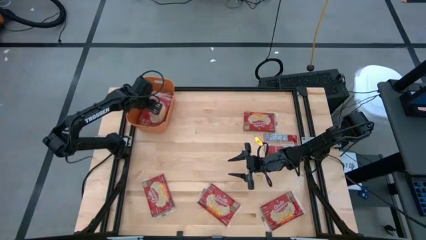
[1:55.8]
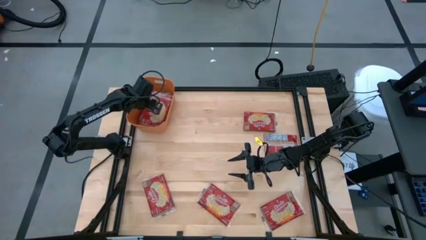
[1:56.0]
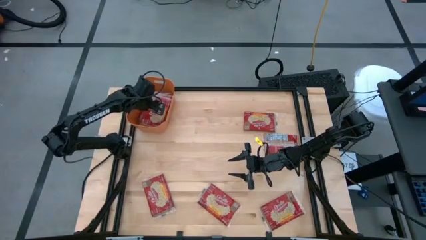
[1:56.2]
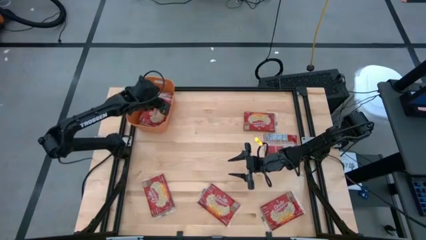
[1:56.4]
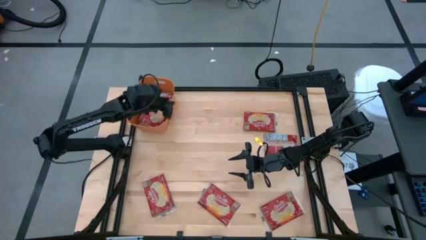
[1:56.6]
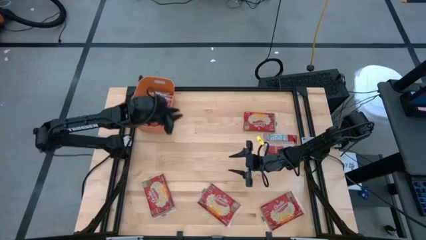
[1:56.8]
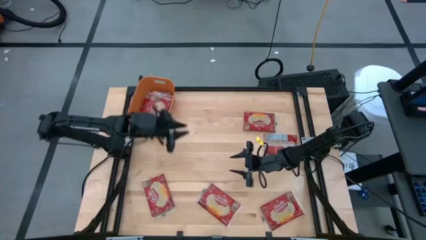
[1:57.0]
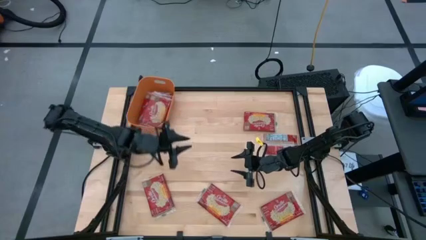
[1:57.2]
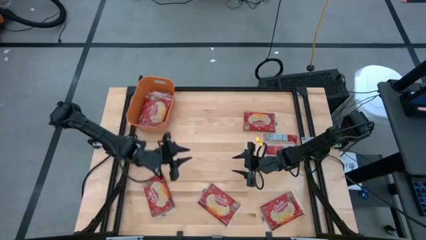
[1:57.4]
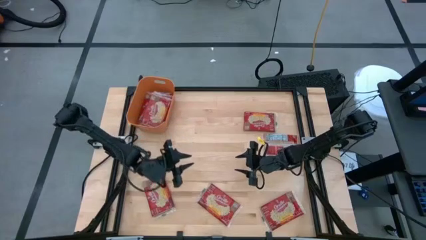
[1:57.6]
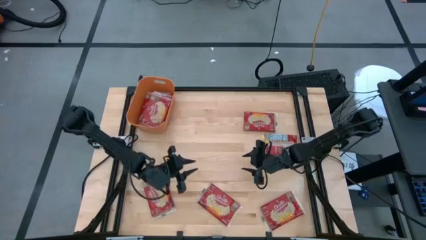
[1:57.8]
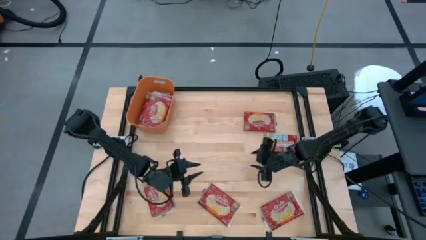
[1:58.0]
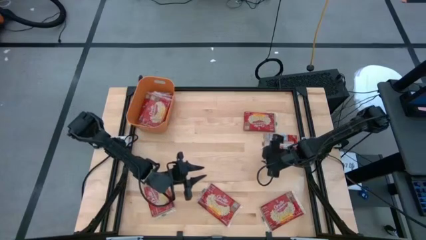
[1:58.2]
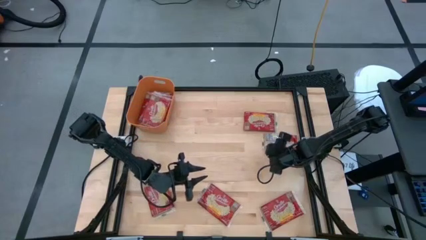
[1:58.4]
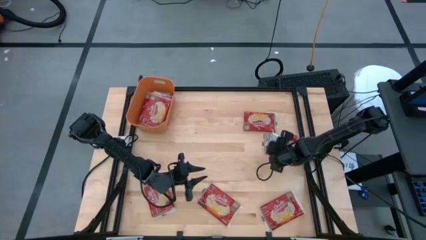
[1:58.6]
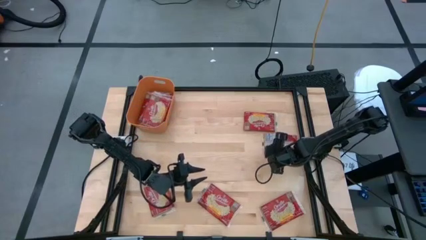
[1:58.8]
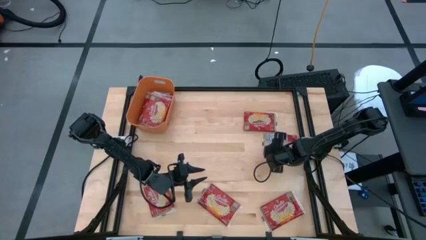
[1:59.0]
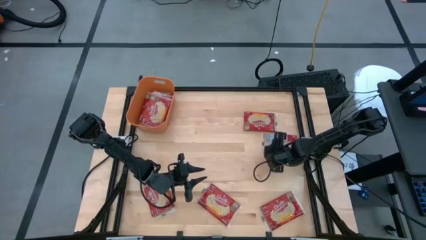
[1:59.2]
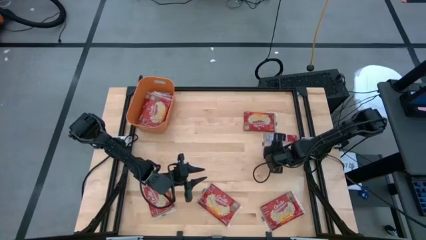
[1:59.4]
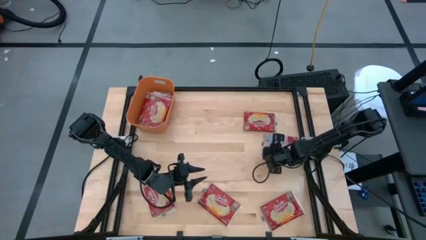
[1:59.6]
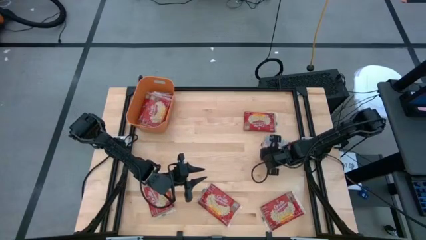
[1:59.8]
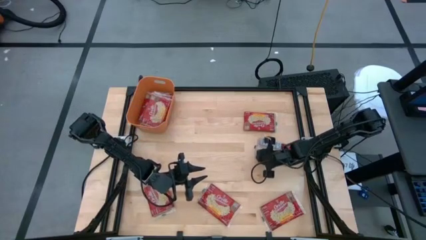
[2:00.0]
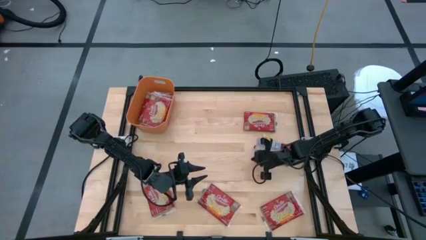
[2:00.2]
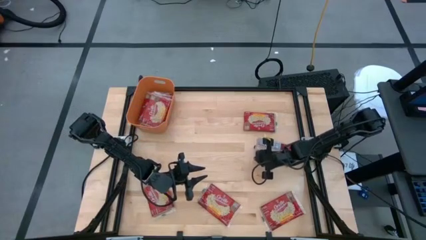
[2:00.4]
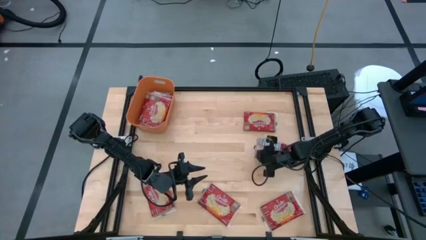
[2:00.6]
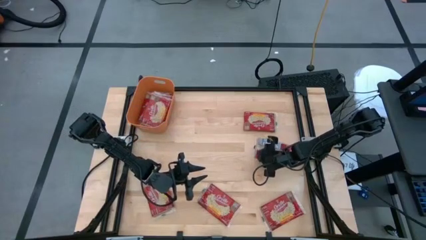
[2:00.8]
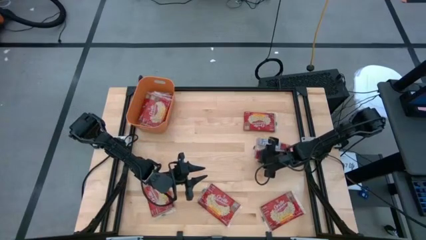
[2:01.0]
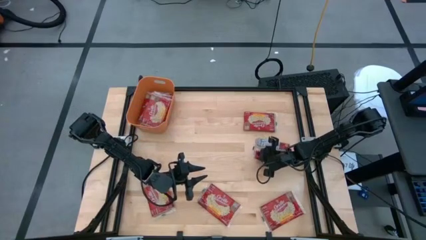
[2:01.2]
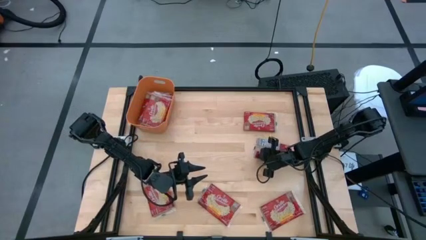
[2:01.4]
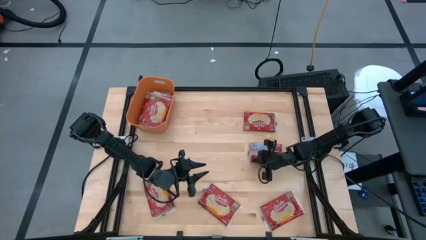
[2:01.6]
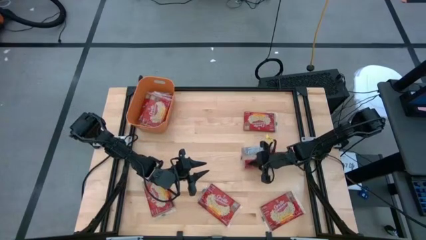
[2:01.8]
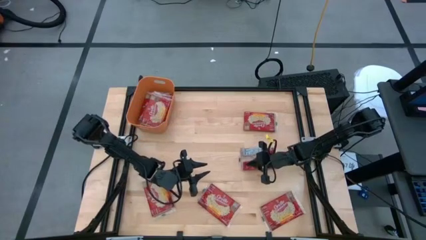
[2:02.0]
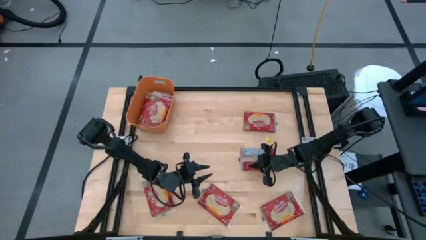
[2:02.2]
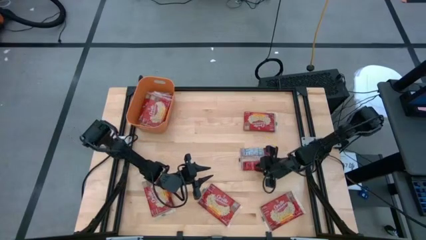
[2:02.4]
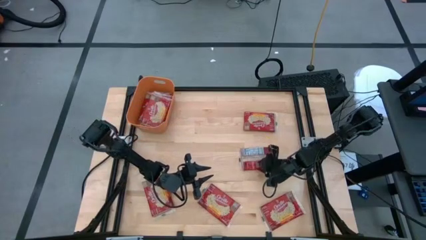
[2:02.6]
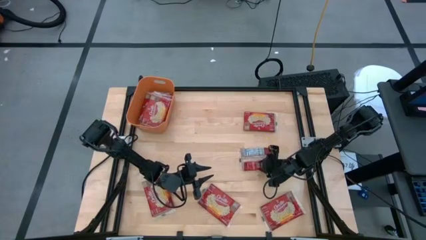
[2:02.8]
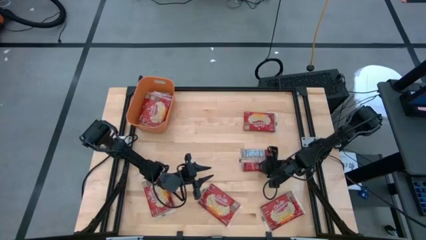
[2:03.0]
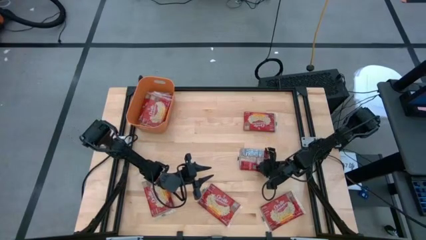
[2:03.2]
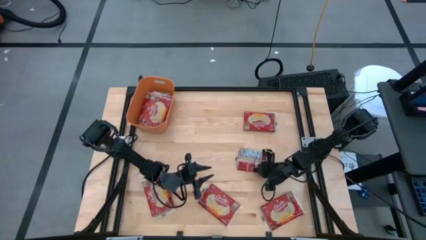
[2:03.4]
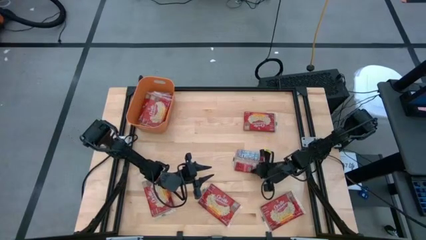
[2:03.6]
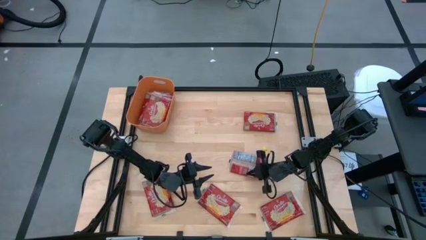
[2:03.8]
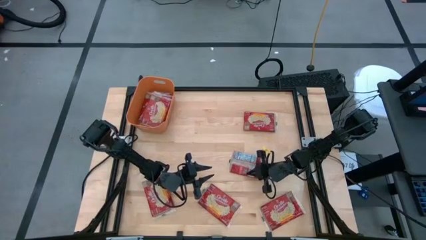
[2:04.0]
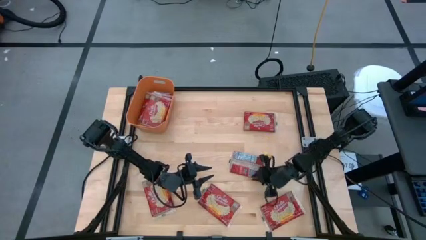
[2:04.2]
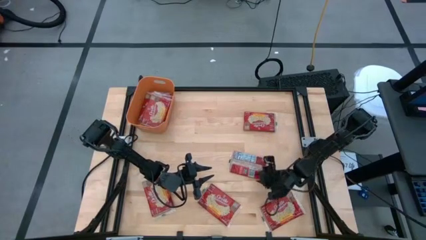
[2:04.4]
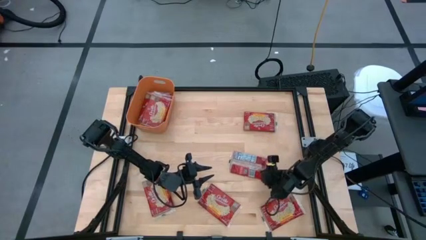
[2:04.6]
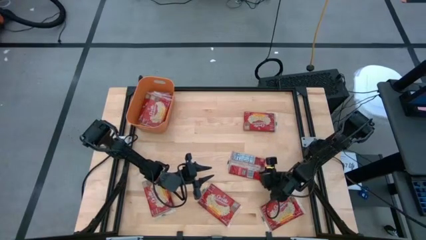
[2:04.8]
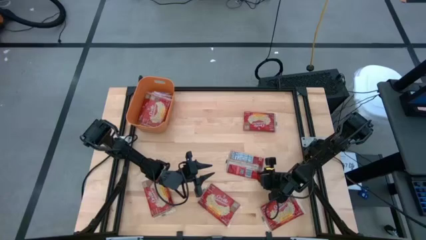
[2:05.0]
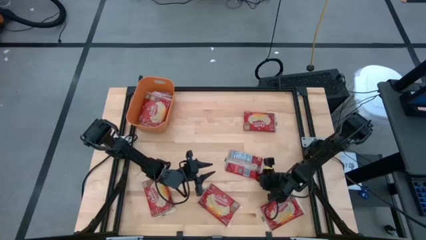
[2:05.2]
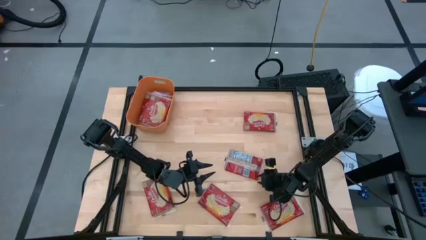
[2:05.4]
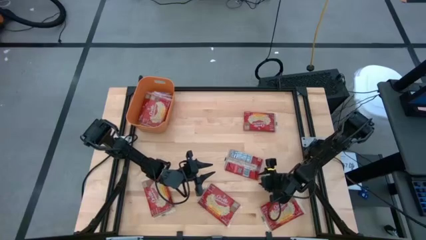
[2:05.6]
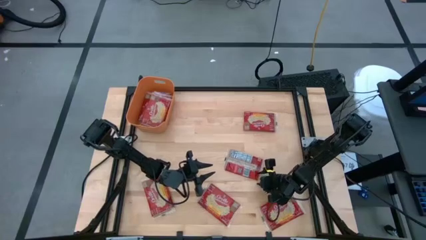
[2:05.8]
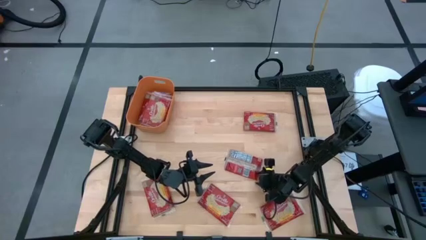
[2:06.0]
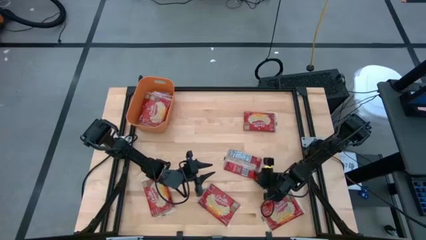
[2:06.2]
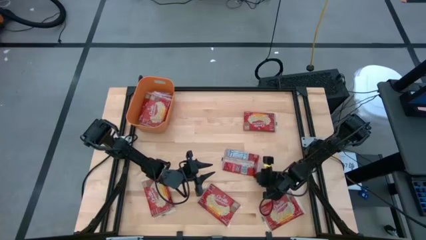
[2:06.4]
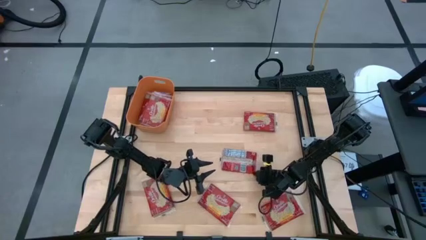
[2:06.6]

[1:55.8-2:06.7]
Task: Sort popcorn bags into baskets
Put the red popcorn bag into the orange bin

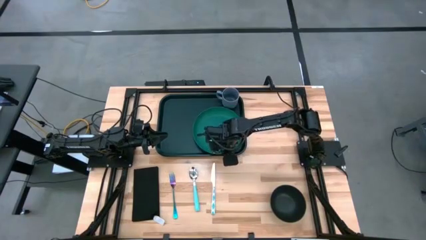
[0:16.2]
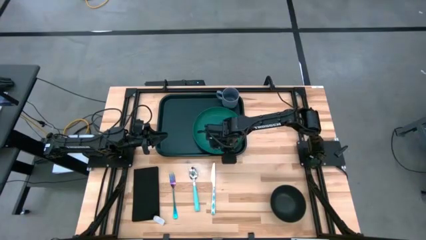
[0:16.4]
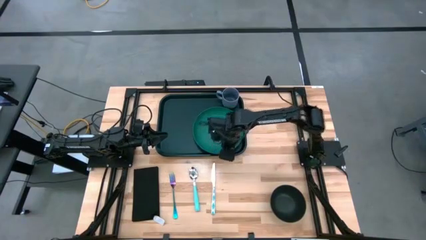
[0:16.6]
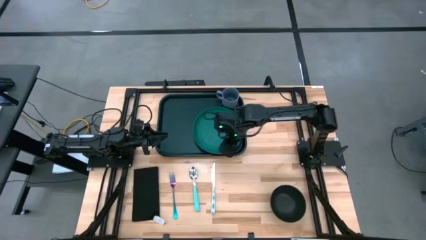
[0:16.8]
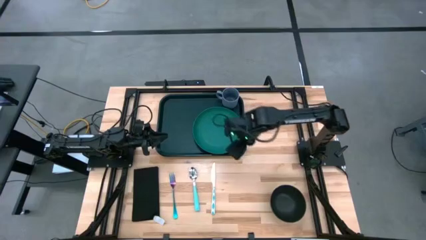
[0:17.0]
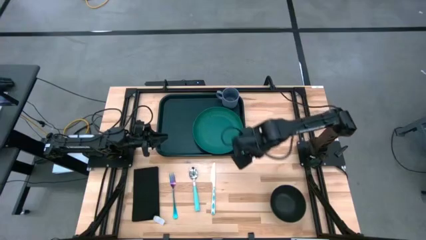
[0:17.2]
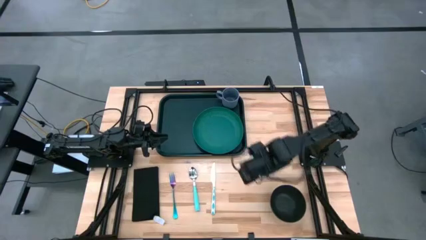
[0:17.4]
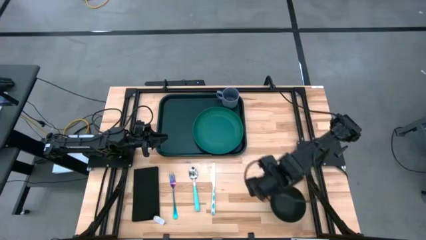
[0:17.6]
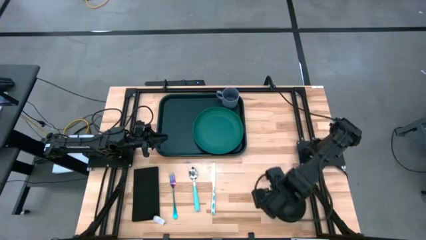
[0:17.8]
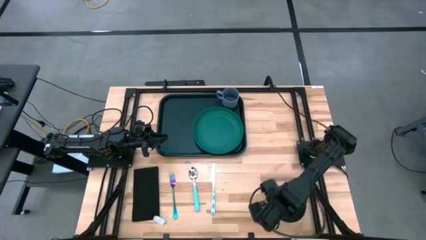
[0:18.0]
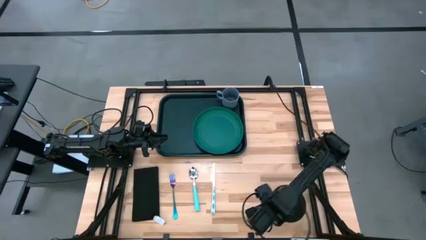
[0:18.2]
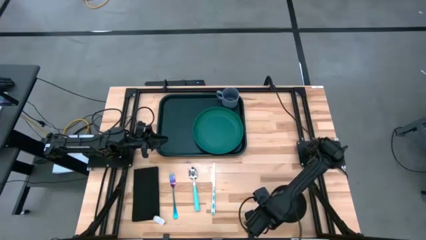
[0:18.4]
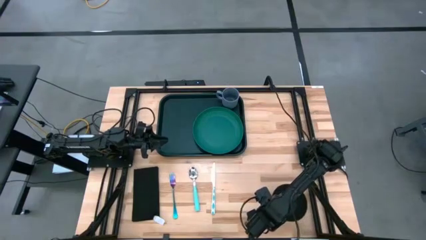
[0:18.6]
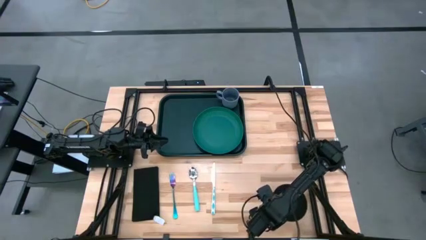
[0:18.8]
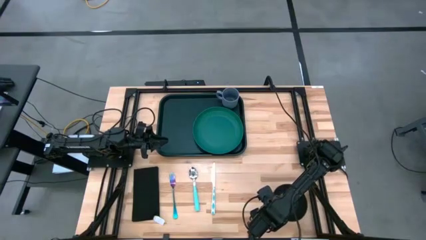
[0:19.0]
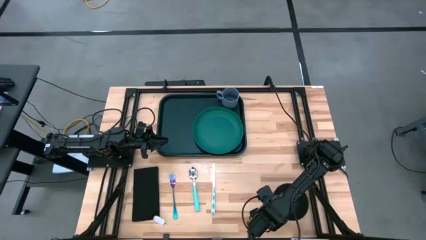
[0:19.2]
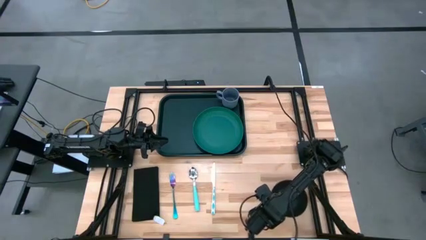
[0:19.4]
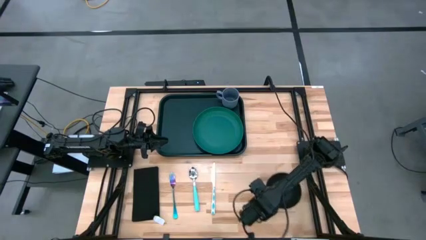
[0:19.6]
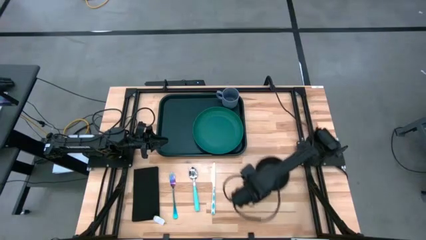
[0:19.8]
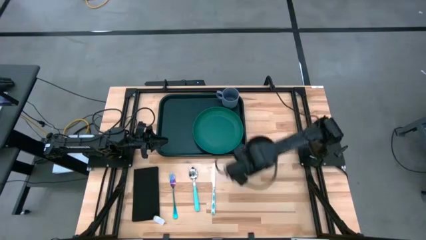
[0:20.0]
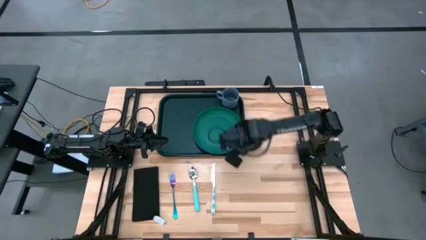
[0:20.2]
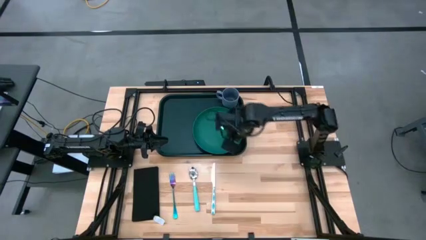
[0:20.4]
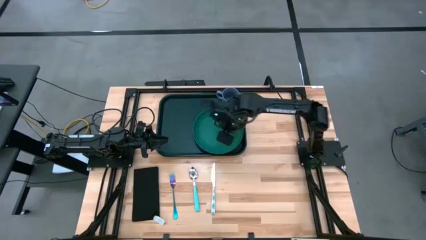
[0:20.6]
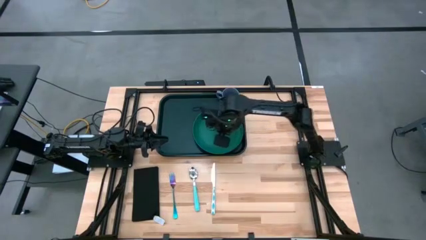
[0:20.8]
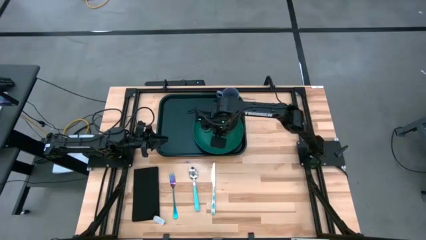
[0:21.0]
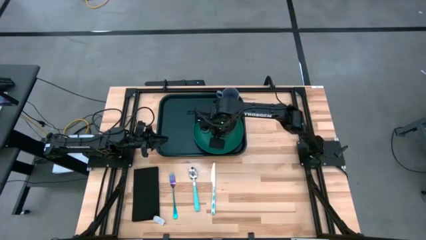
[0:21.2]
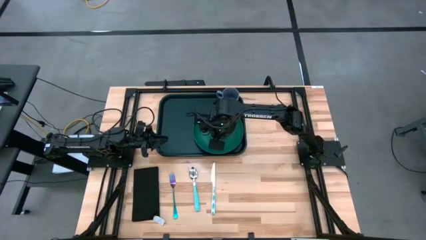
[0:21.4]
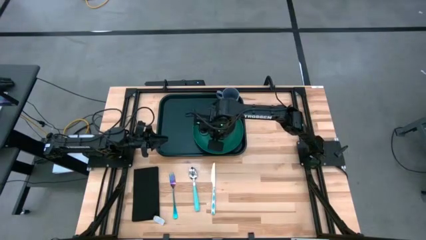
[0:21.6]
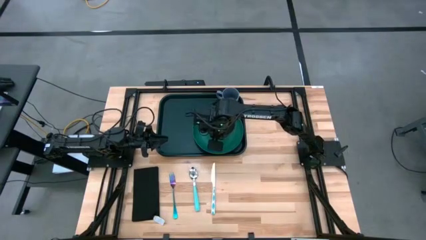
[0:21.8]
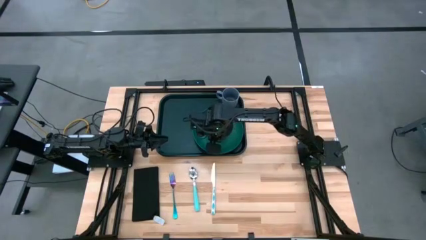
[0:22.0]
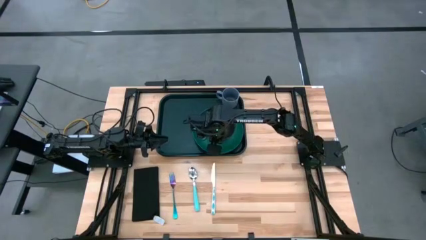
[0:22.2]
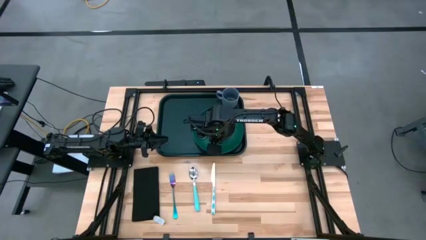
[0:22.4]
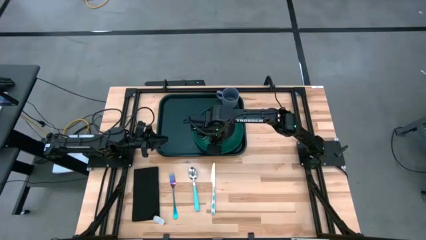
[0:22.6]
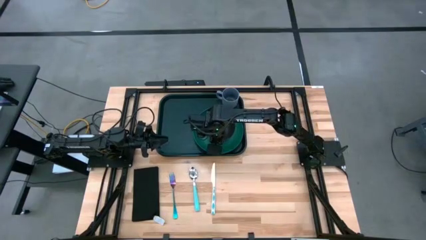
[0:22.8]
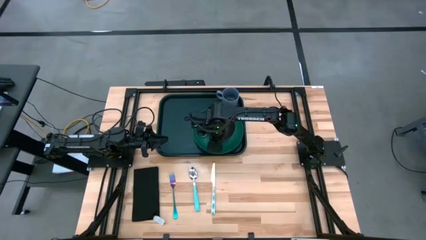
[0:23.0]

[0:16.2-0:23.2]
Task: Set up tray
Put the black bowl on the green plate on the dark green serving tray
